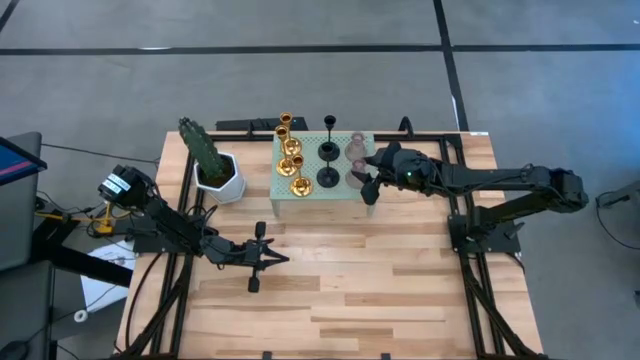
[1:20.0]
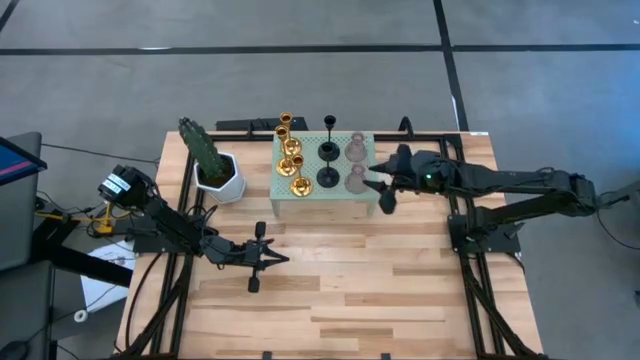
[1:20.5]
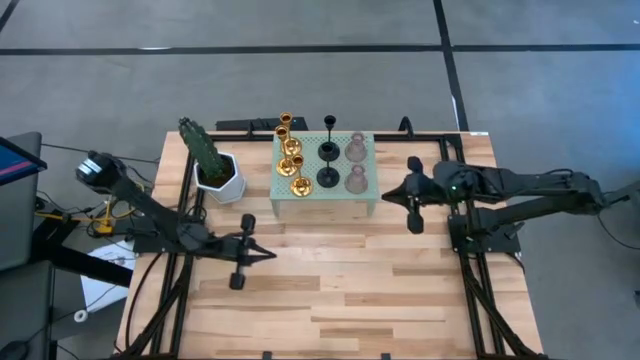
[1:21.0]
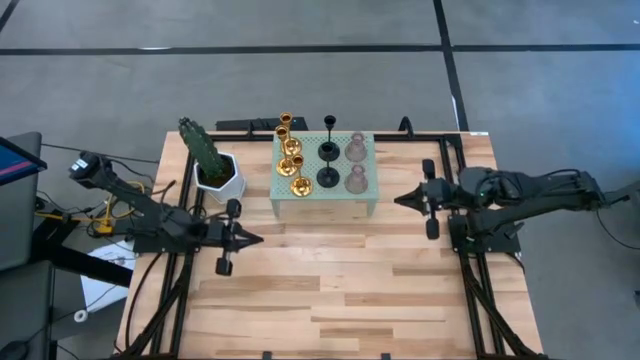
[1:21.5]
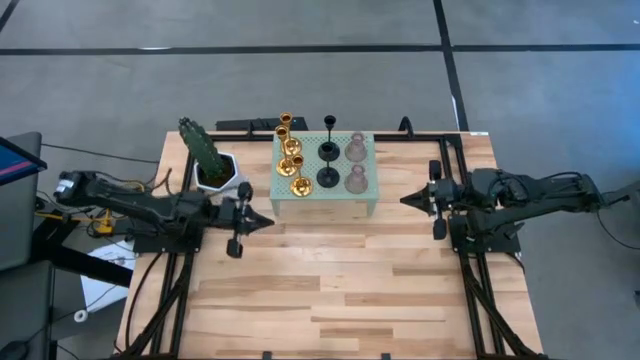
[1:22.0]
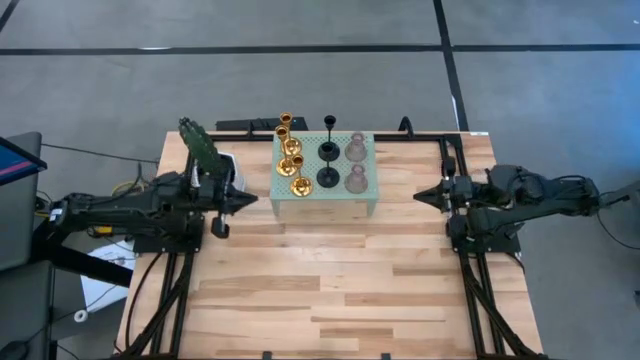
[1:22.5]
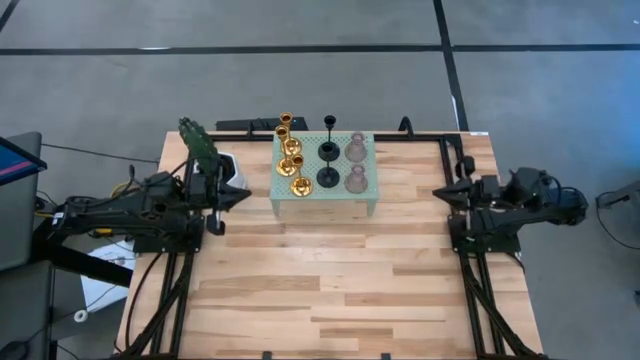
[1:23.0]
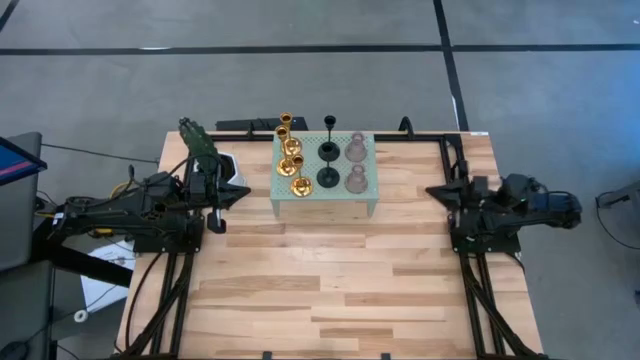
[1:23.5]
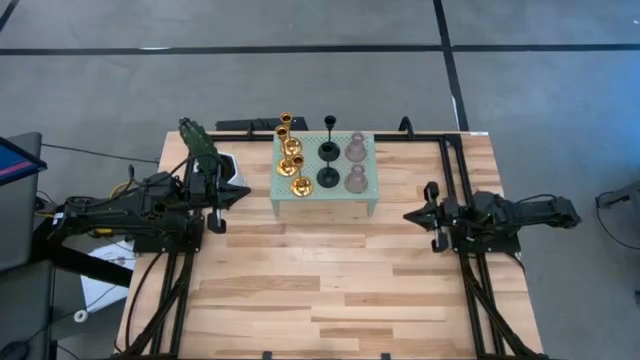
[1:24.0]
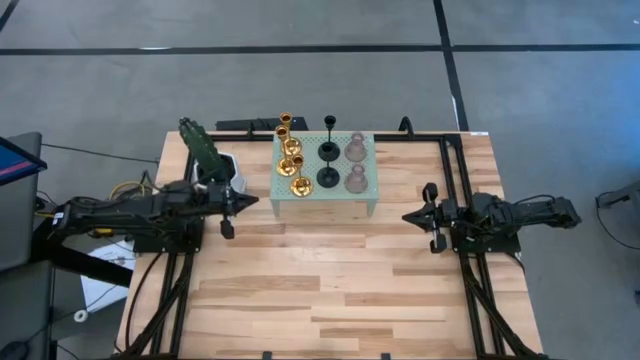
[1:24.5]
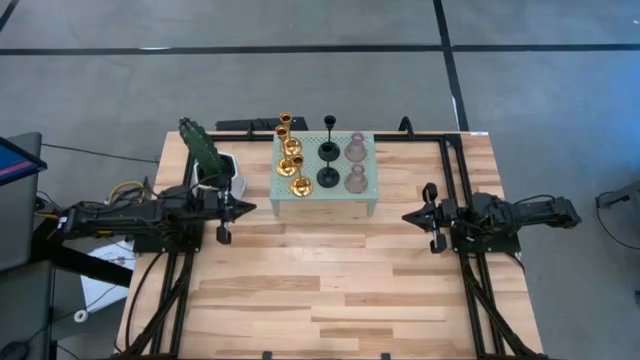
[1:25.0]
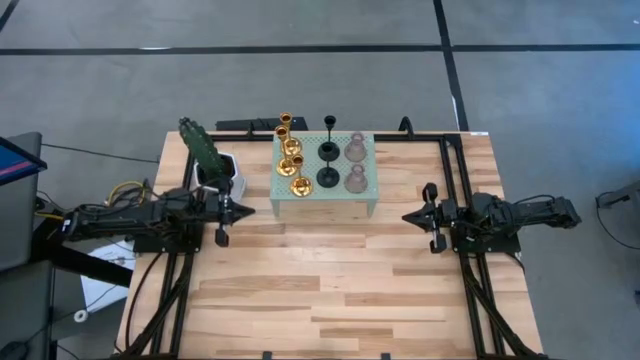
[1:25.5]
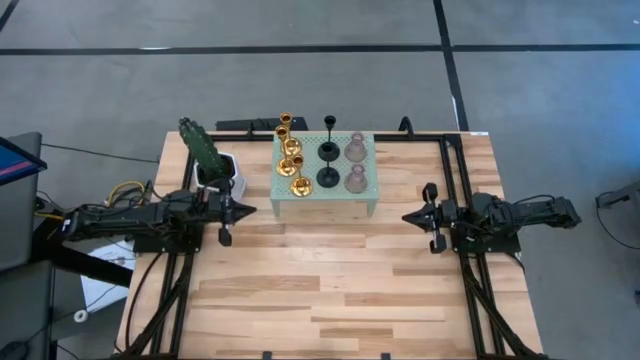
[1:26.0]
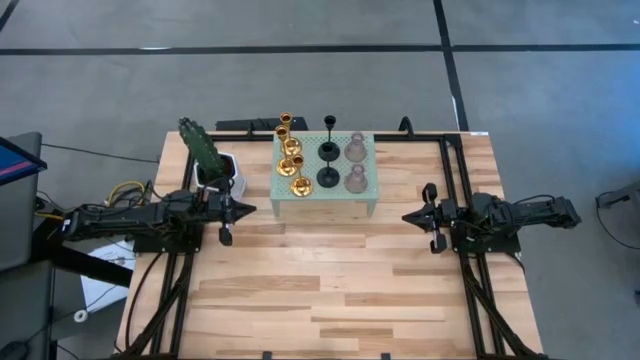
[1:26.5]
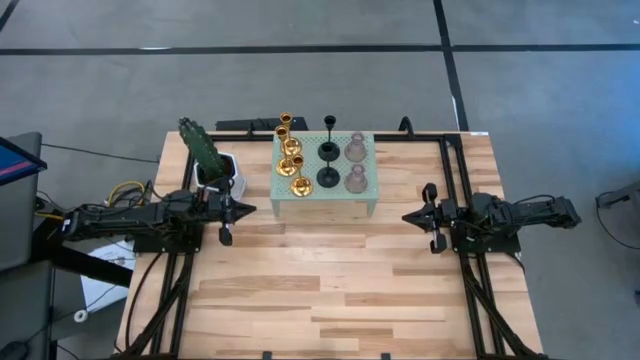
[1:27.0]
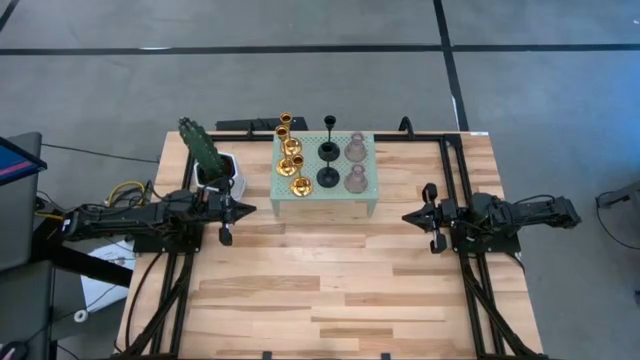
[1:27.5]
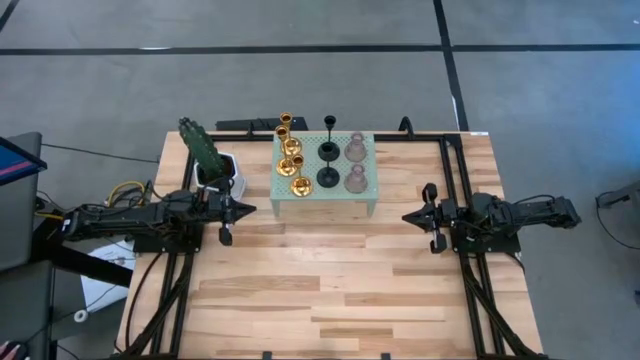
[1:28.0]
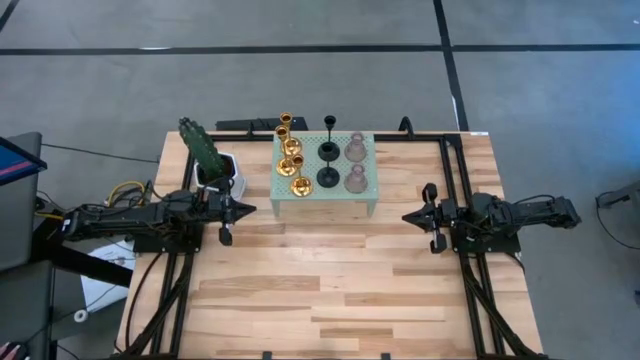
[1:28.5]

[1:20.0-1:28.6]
Task: Pick & Place candle stick holders
Return to Home Position

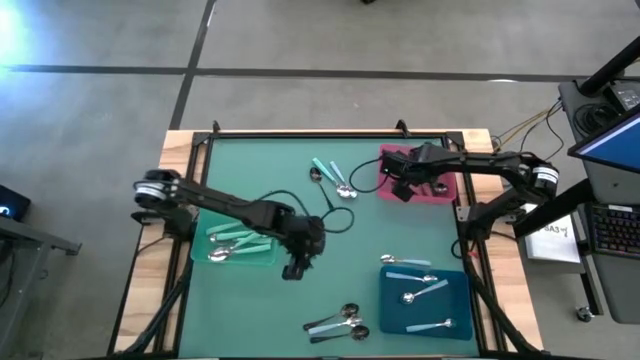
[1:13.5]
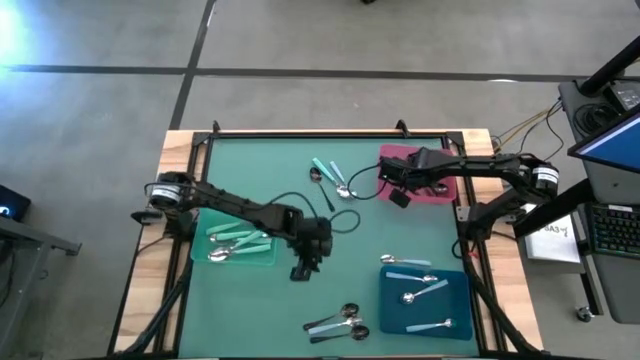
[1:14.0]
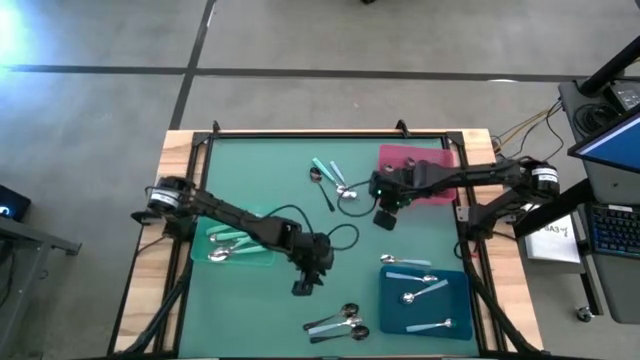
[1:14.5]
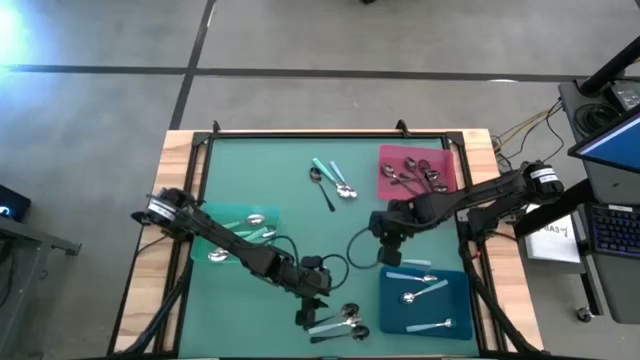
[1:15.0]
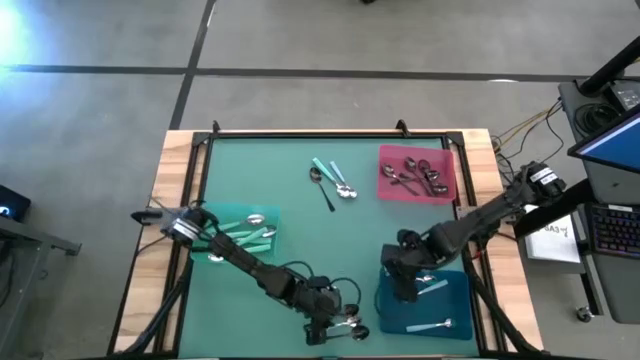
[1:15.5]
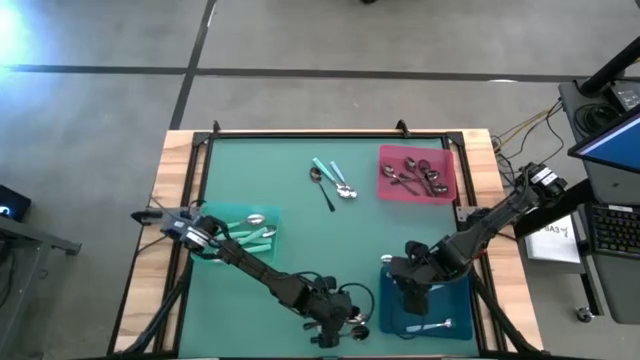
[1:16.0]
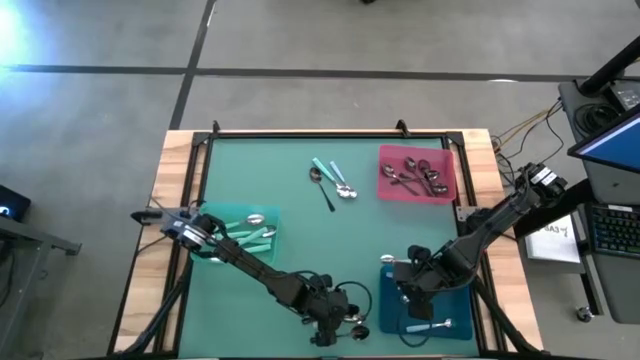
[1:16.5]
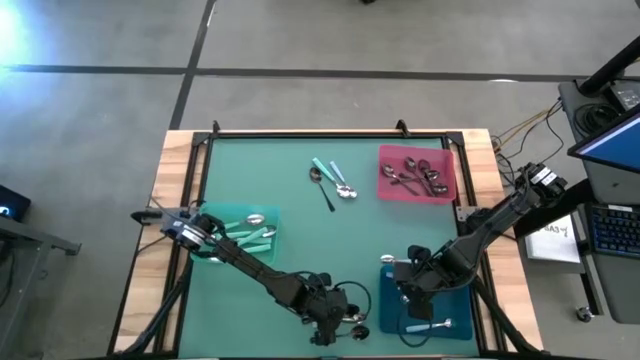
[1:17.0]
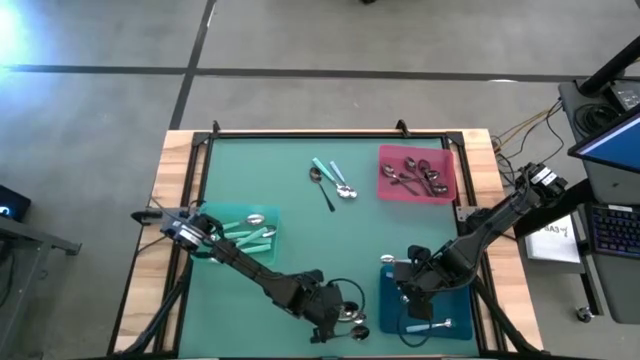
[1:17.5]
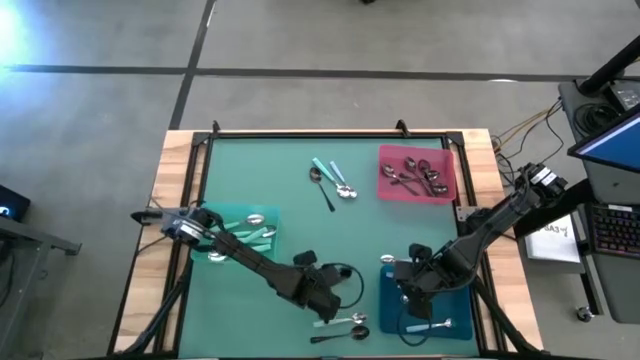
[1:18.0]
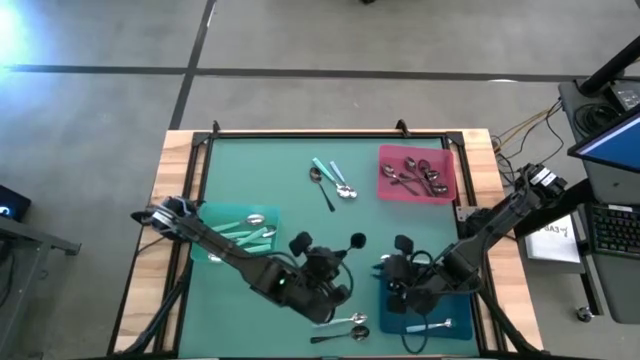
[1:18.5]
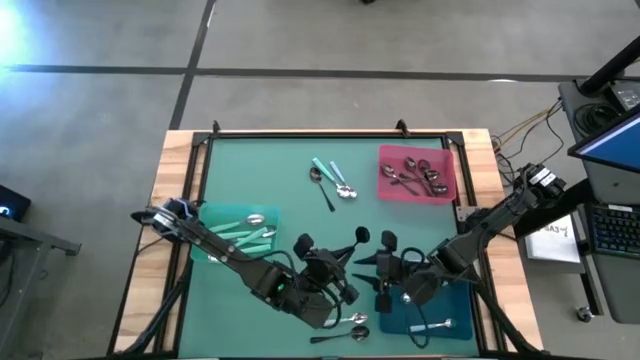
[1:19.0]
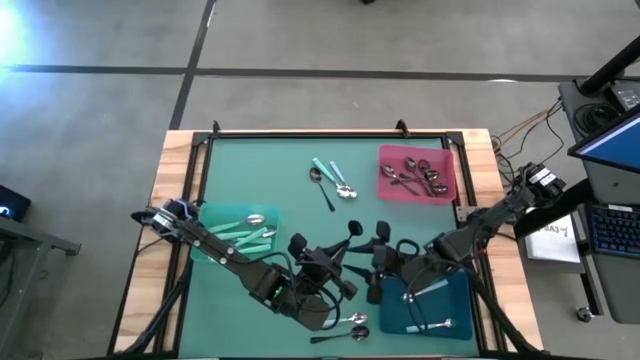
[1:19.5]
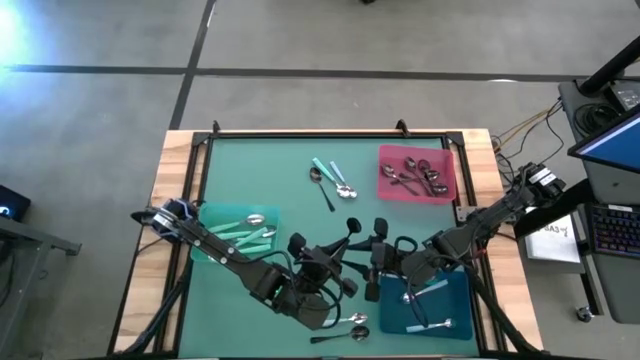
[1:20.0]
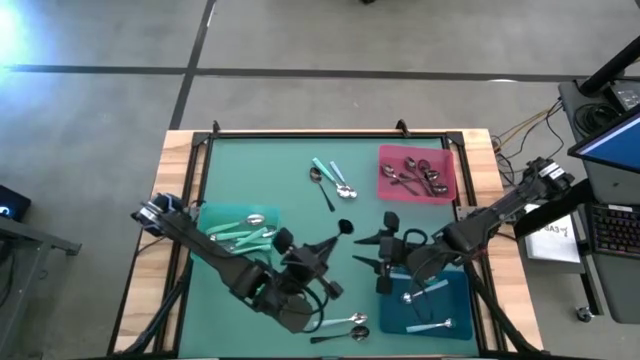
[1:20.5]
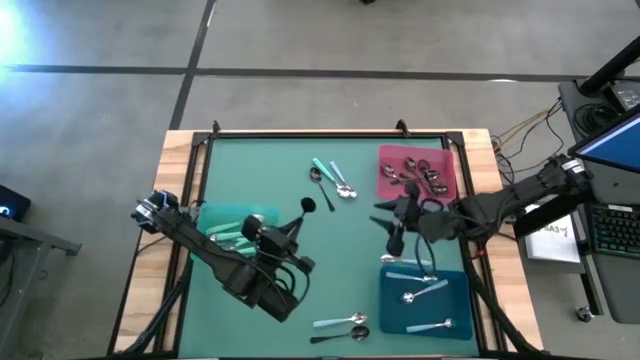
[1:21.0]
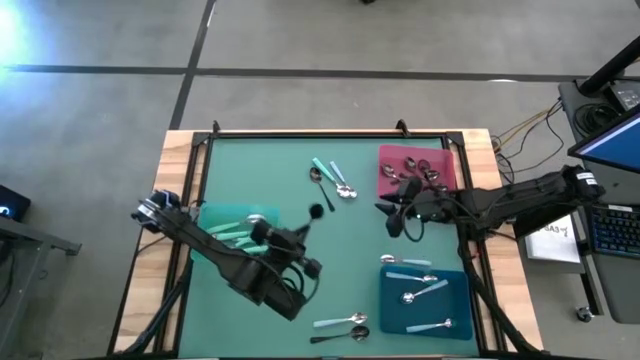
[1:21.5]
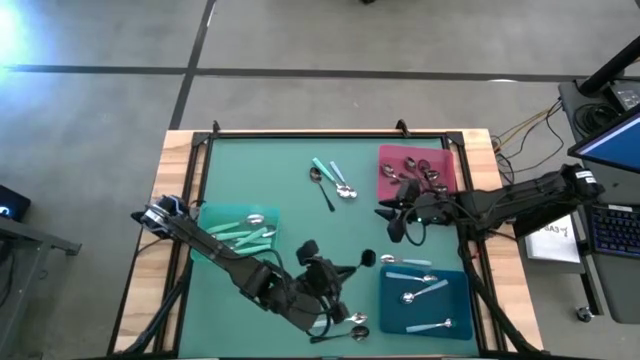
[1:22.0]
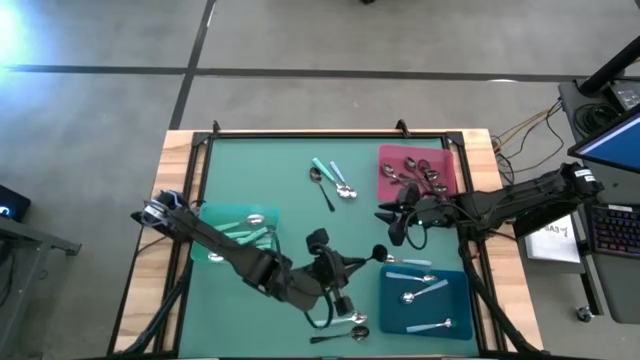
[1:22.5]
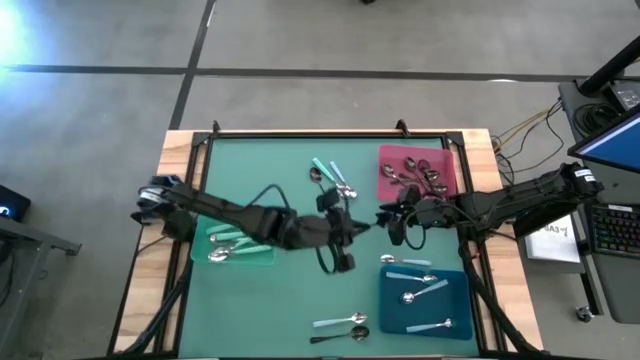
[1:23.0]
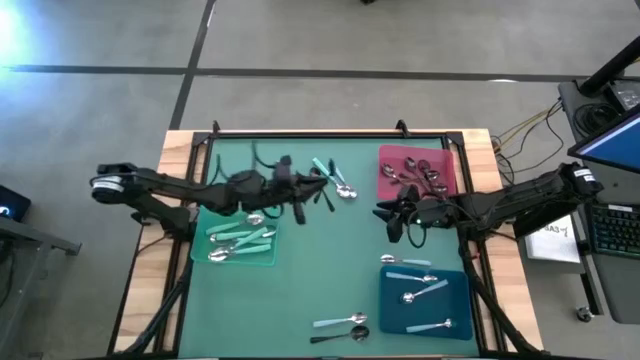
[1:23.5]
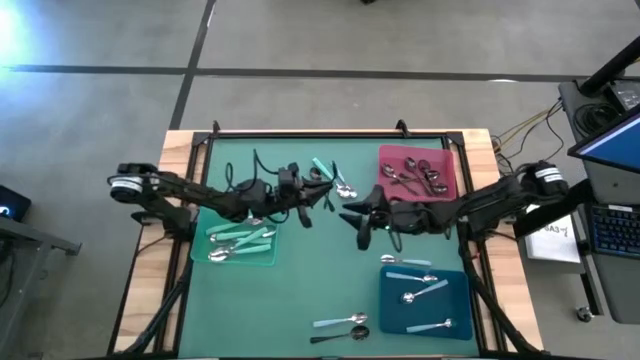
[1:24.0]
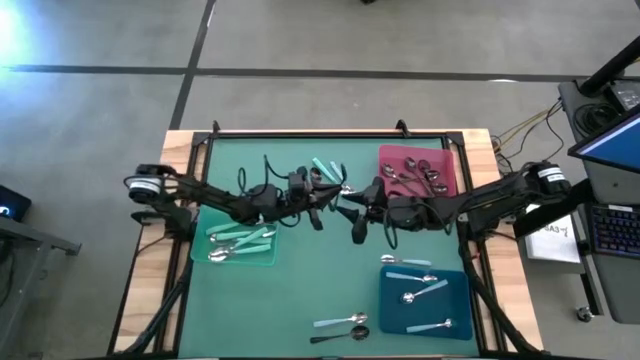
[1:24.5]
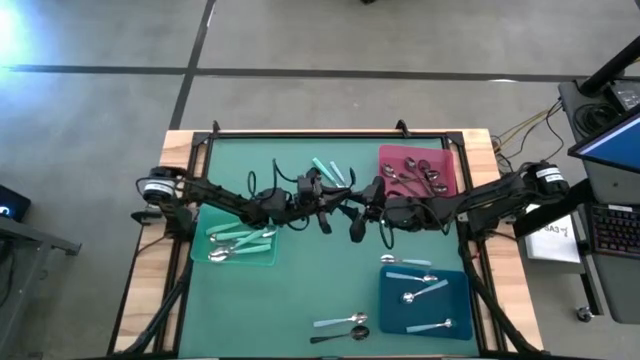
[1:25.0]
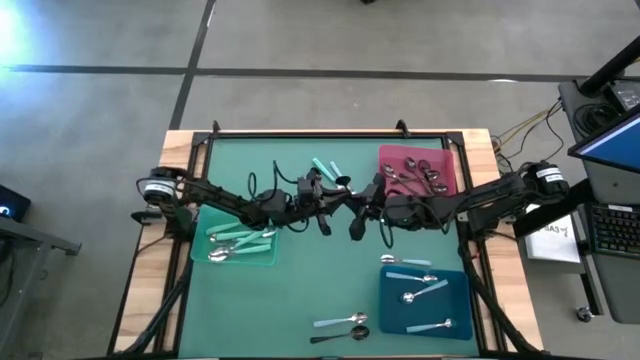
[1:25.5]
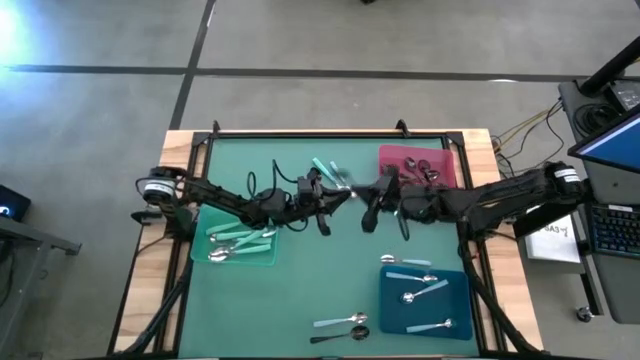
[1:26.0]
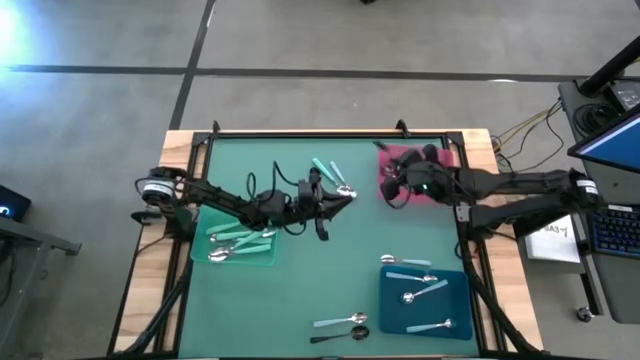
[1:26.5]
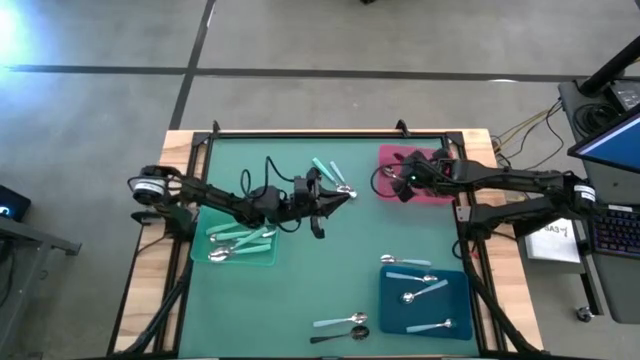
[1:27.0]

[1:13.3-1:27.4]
Task: Sort silverware by color (type)
Put the black spoon into the black bin
